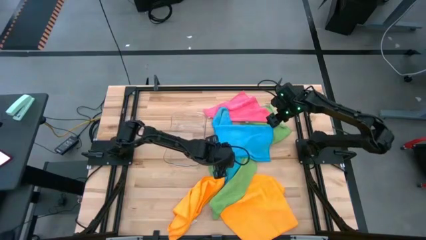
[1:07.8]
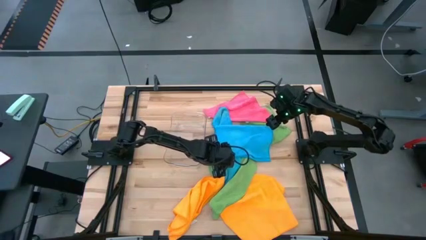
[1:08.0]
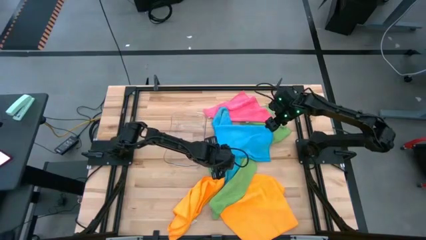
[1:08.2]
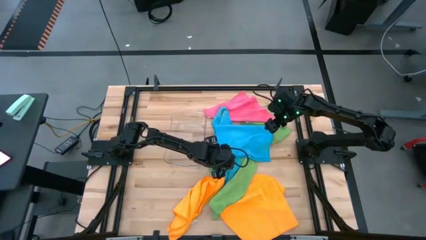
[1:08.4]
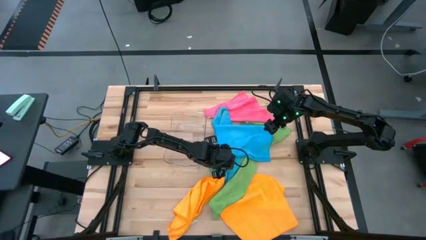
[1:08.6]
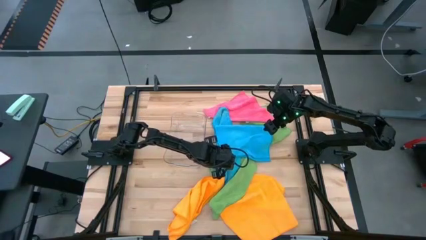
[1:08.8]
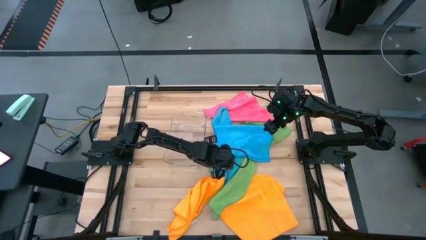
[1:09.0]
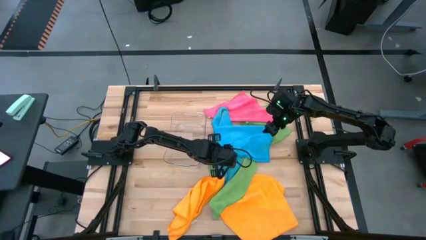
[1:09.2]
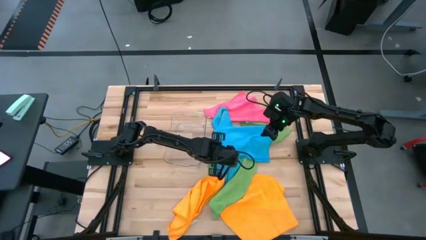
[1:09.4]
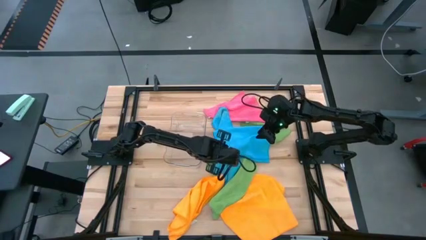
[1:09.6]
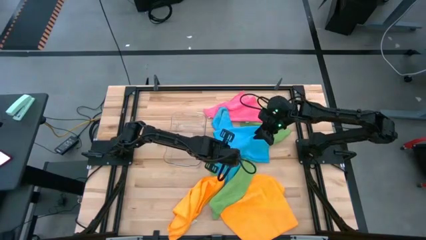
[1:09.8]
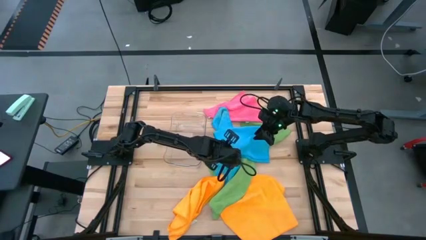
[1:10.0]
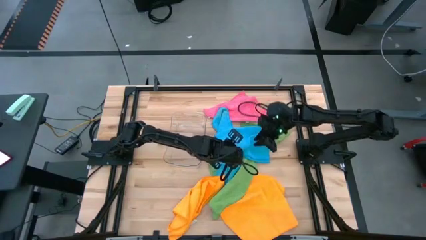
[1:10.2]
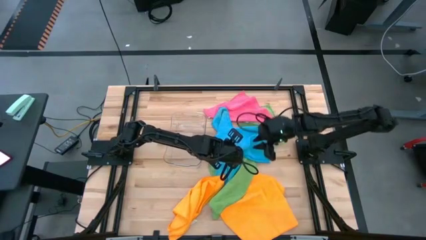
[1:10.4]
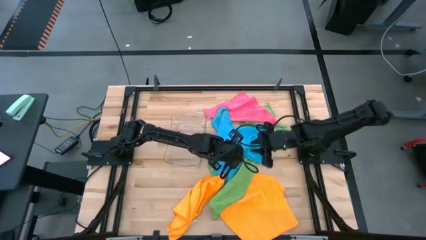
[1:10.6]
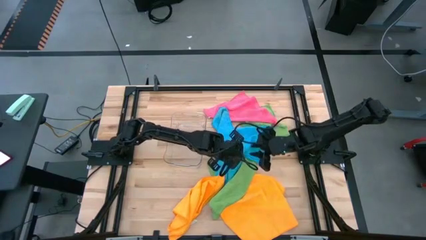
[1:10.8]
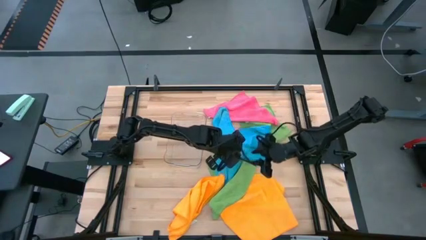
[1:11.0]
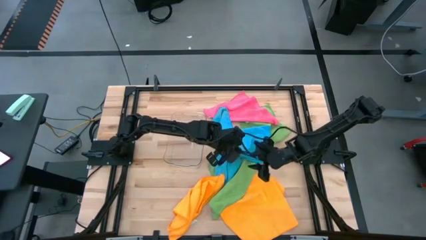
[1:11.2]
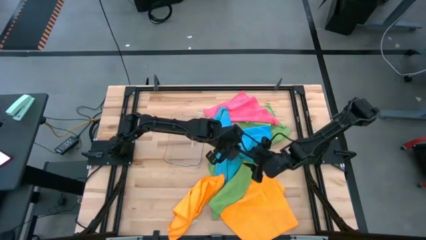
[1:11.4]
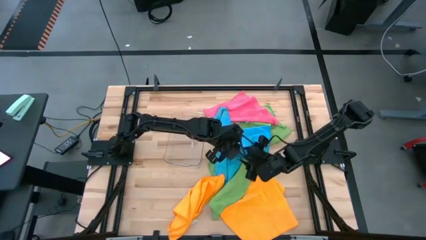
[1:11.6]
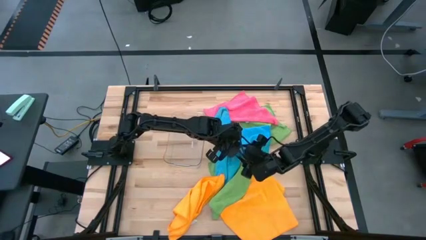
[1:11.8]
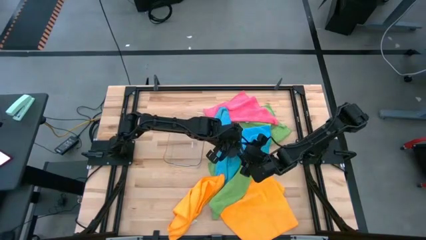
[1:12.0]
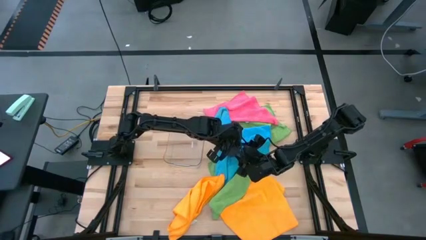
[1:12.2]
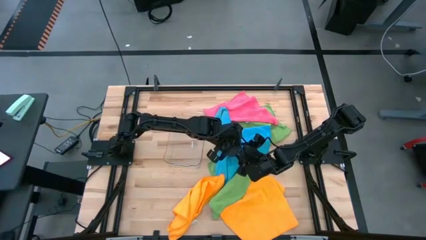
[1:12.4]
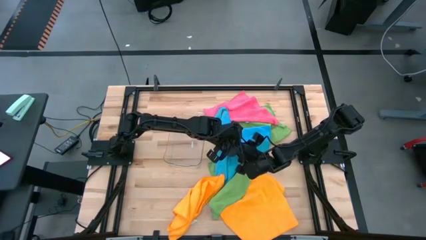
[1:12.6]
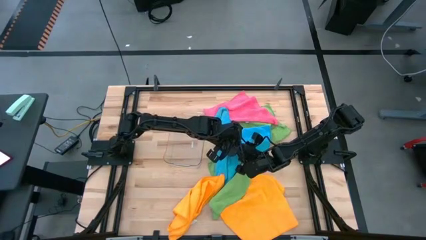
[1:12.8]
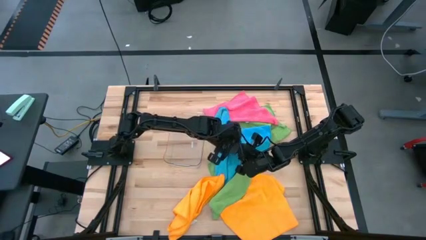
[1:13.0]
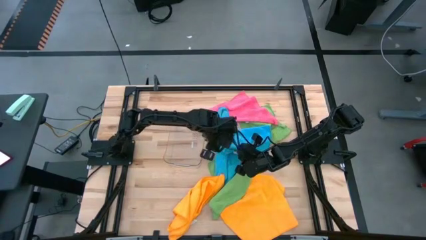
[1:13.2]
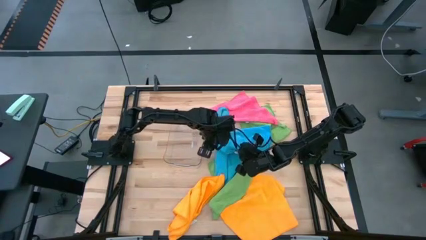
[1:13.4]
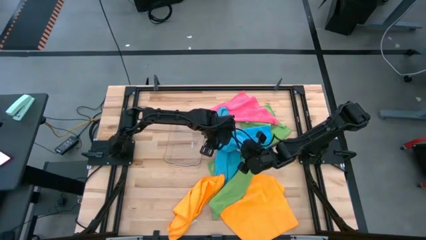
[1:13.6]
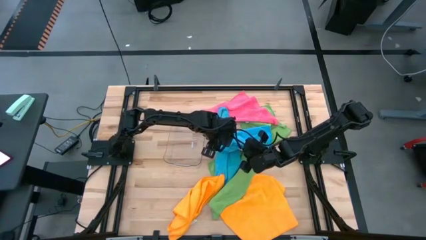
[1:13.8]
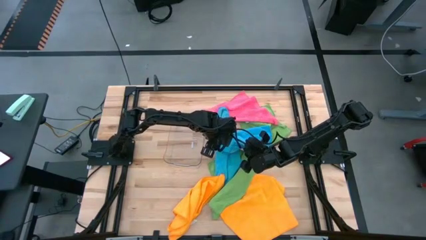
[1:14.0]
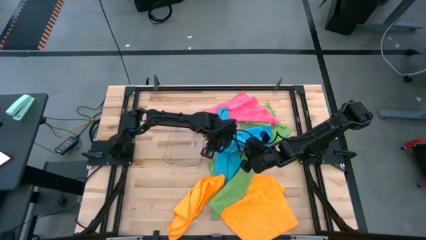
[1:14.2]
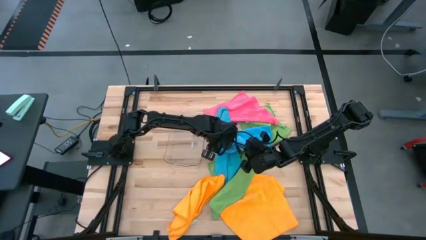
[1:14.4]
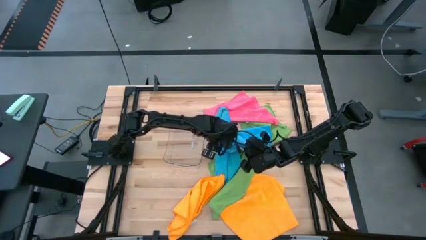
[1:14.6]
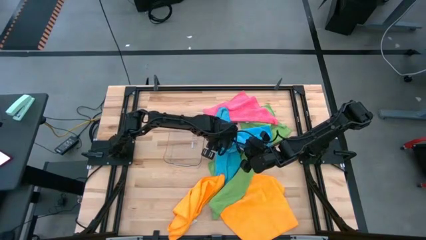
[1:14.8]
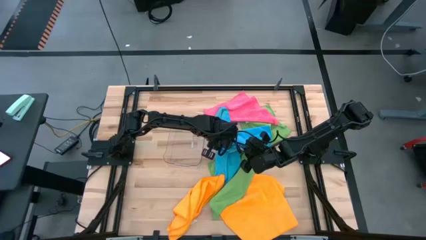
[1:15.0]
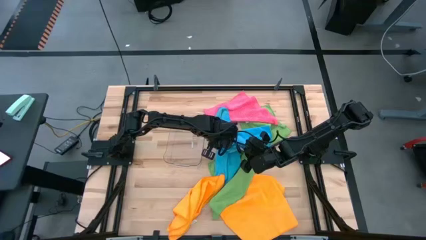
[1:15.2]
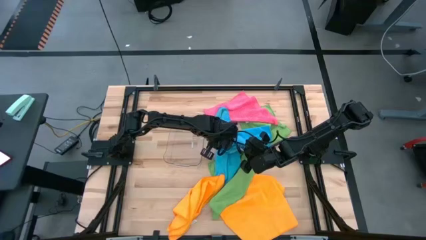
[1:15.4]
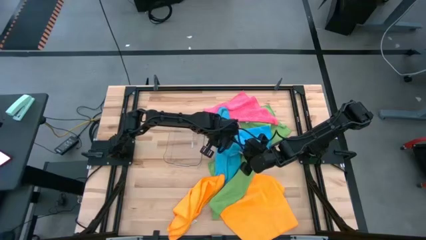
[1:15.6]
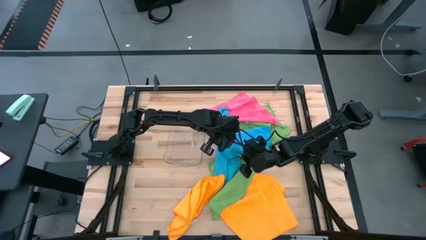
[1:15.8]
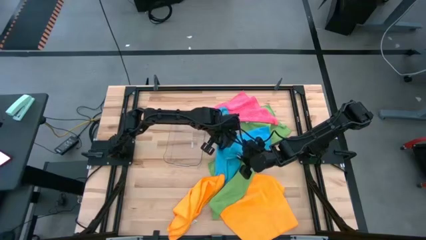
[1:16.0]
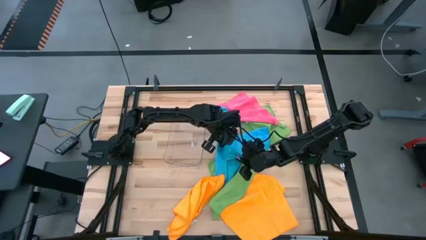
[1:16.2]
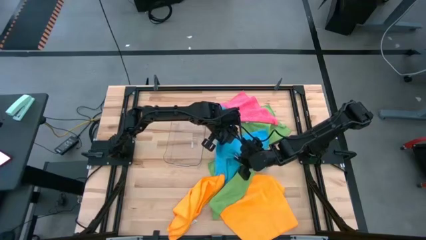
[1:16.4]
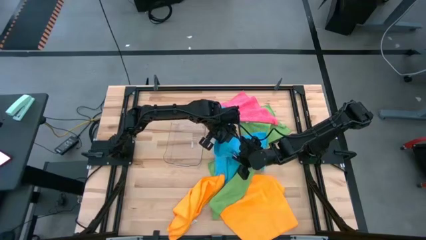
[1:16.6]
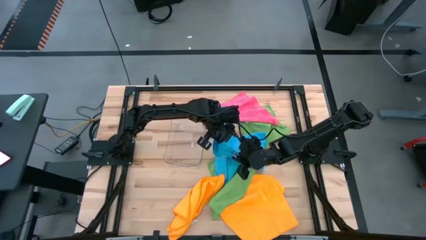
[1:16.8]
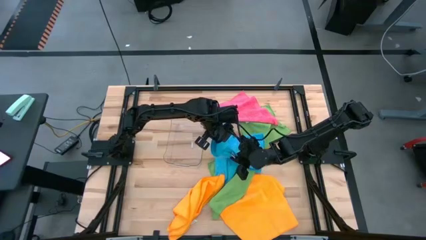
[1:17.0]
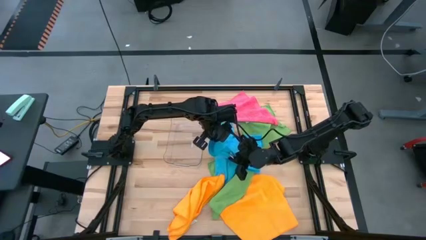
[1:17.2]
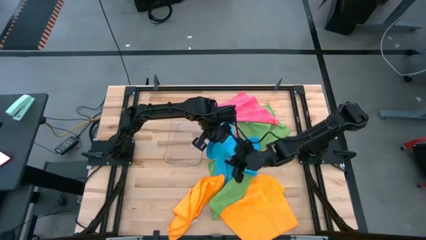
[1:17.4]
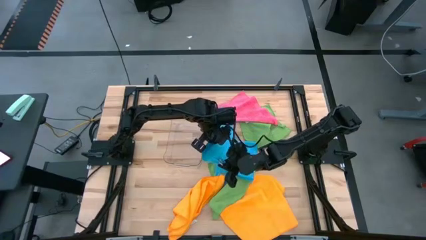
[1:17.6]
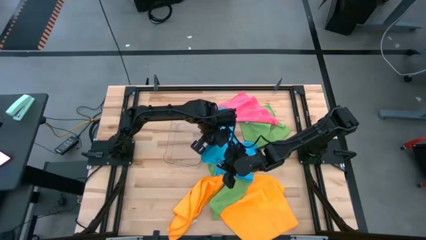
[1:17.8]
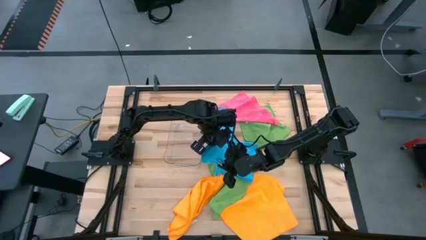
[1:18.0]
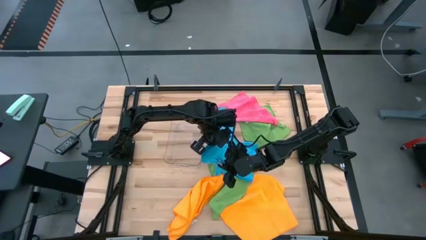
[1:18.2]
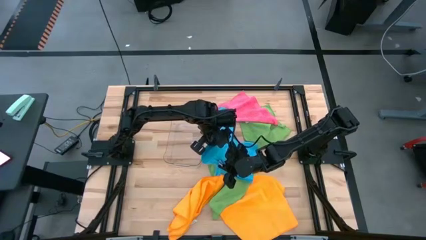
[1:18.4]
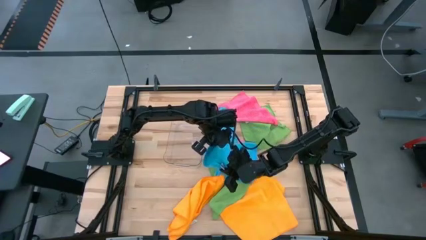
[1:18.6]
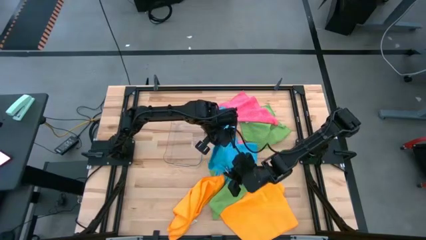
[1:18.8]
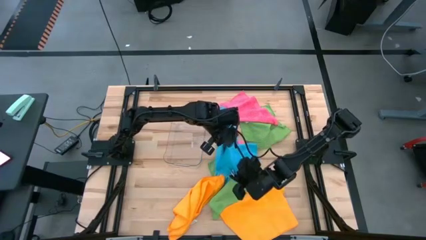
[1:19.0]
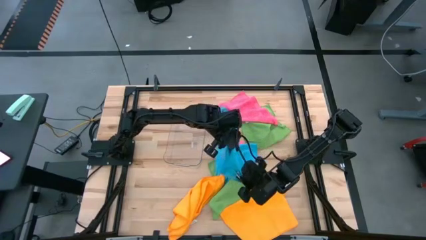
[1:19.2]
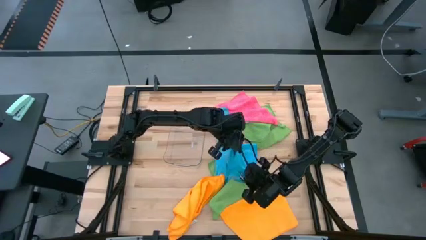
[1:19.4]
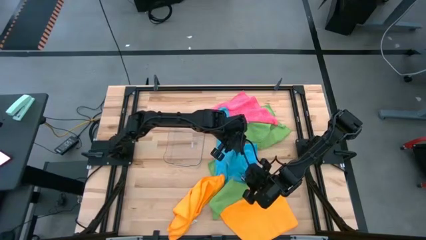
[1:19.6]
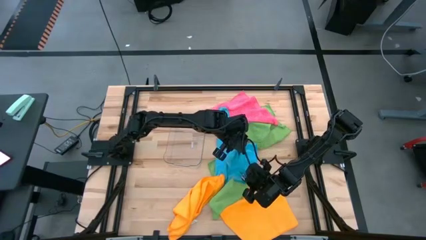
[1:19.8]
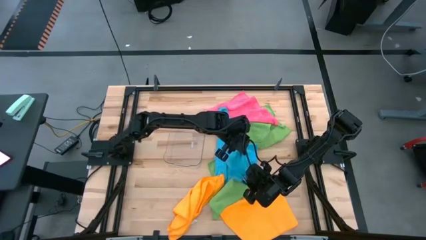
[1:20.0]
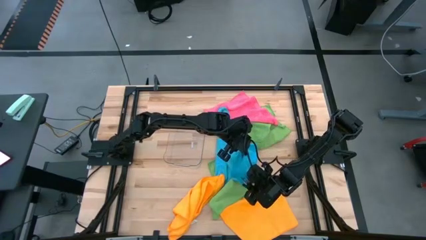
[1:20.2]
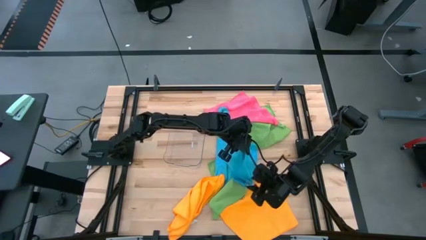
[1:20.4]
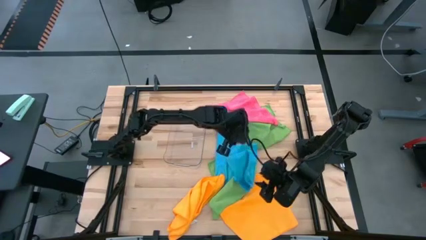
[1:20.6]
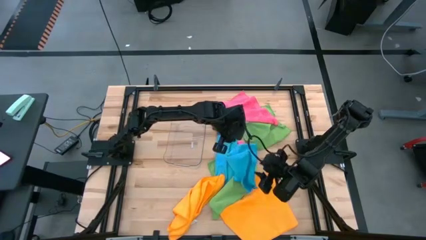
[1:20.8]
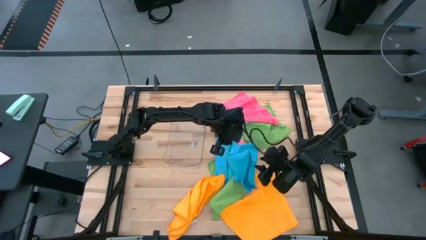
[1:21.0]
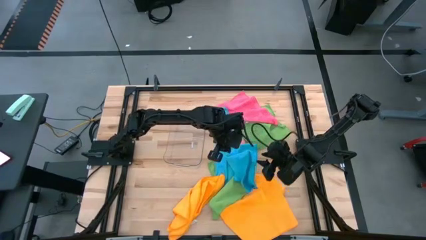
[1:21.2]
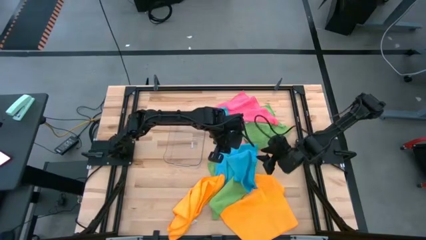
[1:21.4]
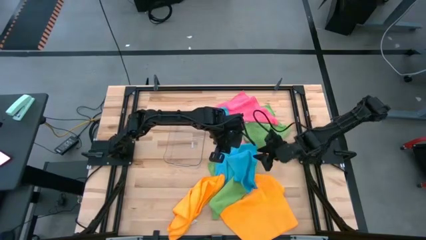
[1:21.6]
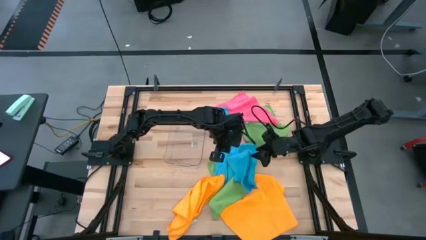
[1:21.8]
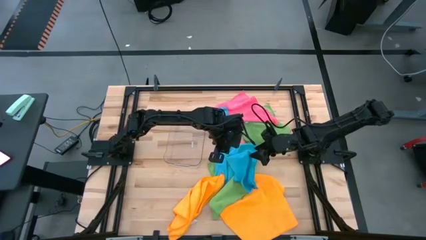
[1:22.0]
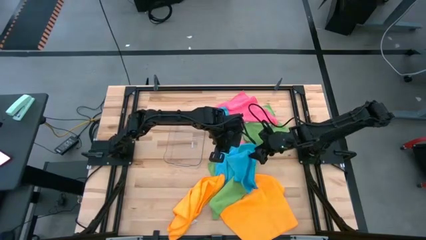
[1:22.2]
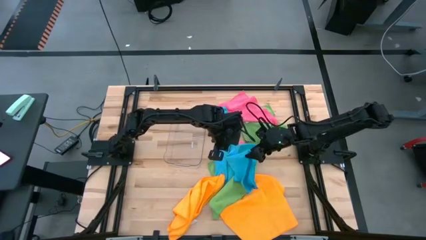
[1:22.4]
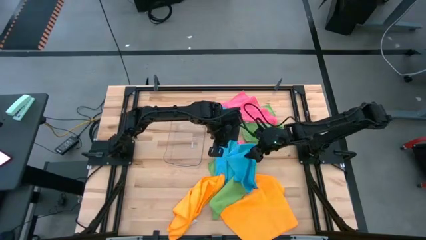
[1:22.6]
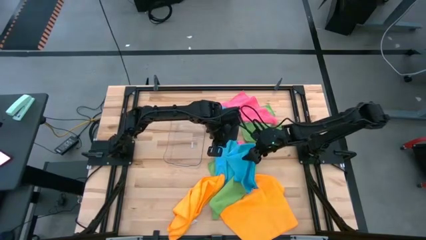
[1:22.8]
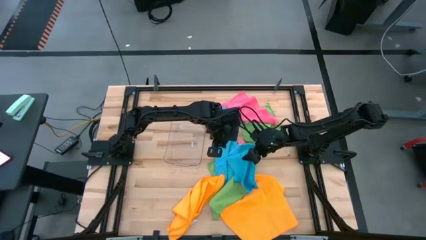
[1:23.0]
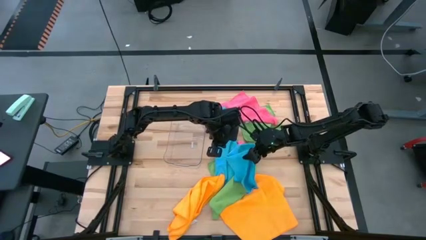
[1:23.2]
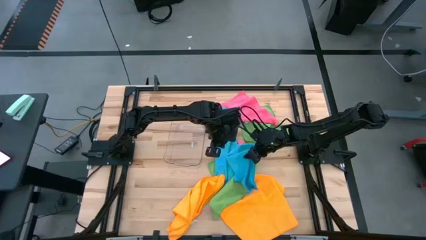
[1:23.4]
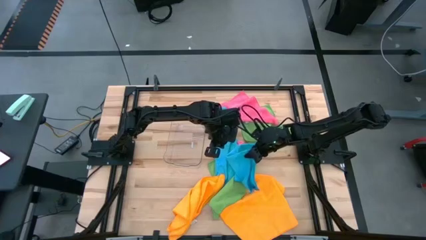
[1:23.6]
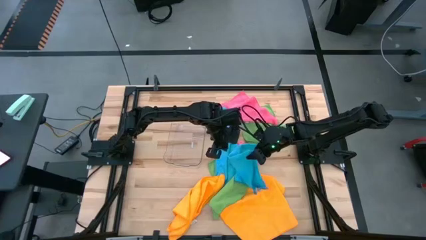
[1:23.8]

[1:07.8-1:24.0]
Task: Fold microfiber towels
Fold the left blue towel
